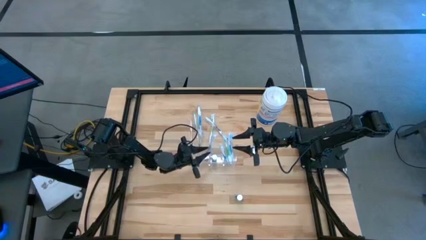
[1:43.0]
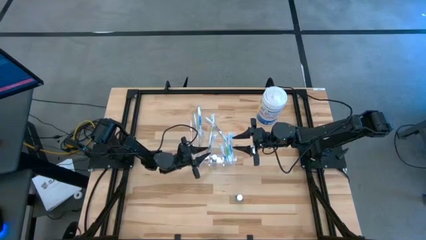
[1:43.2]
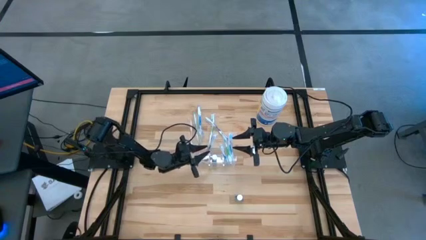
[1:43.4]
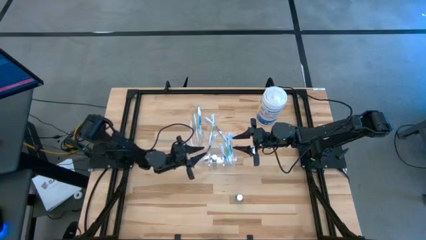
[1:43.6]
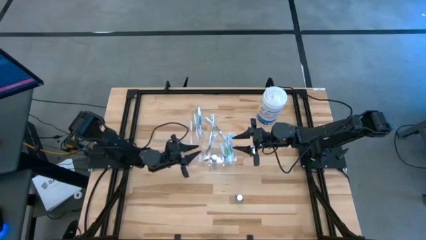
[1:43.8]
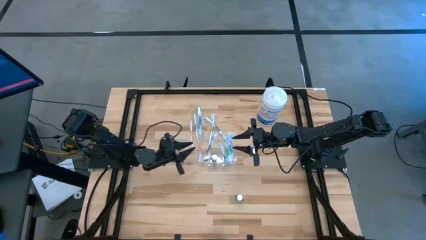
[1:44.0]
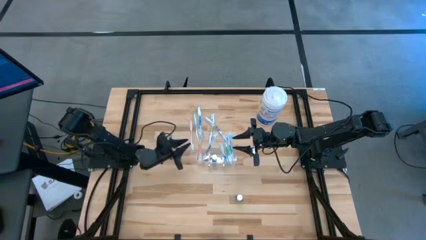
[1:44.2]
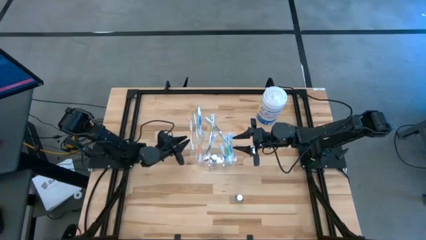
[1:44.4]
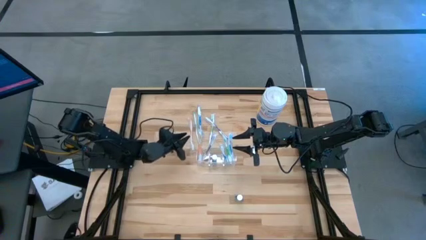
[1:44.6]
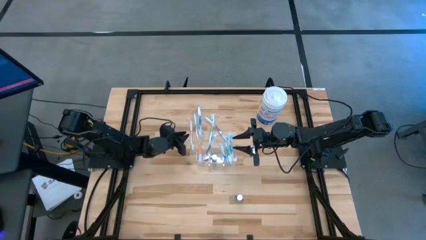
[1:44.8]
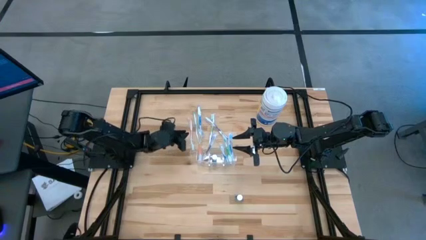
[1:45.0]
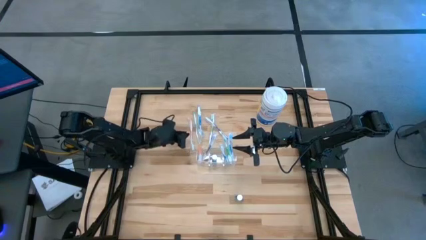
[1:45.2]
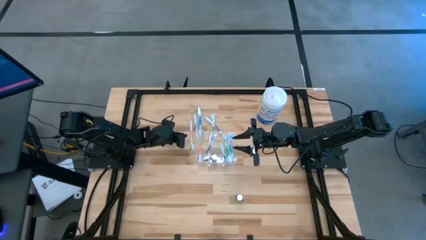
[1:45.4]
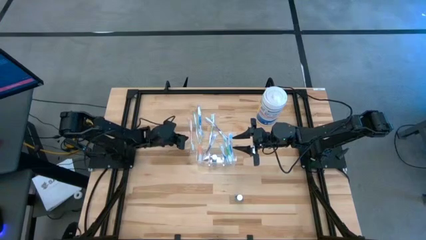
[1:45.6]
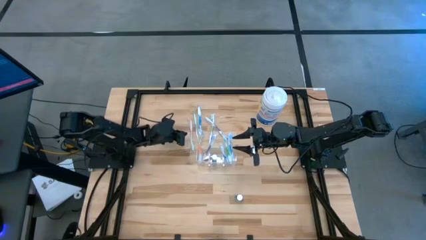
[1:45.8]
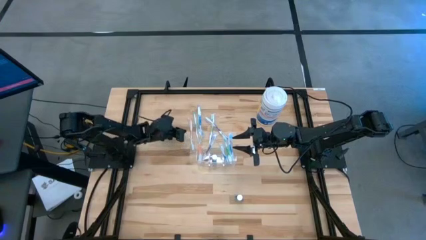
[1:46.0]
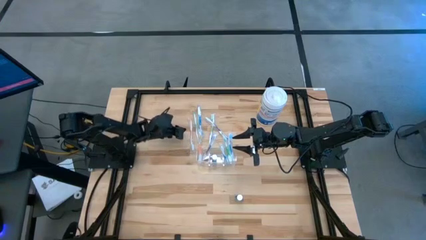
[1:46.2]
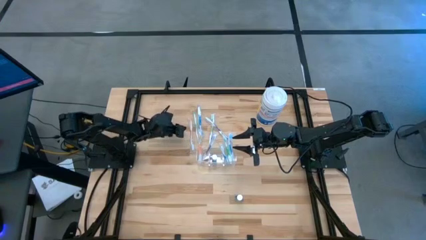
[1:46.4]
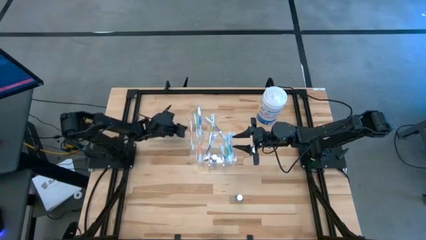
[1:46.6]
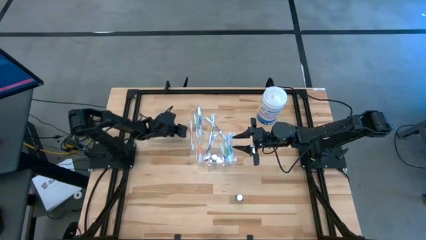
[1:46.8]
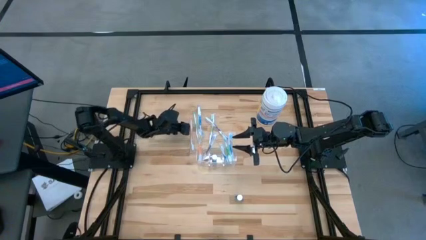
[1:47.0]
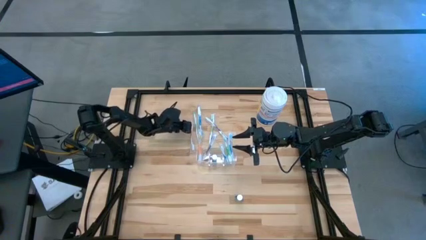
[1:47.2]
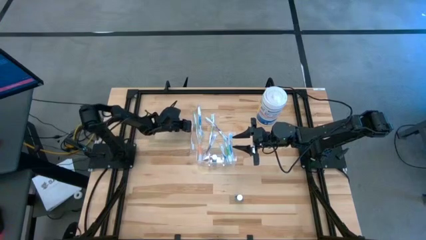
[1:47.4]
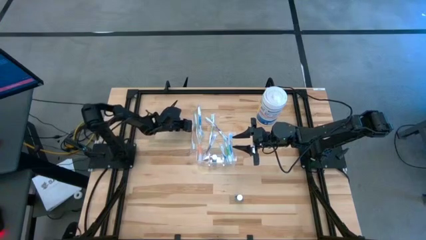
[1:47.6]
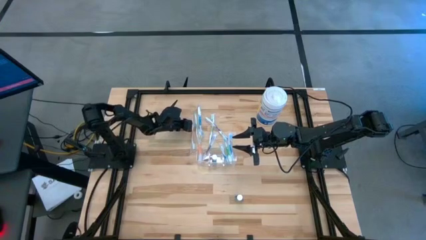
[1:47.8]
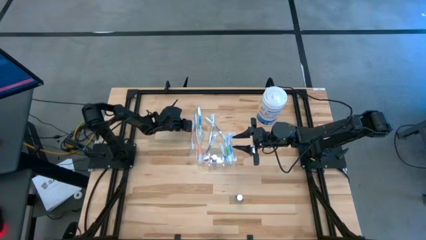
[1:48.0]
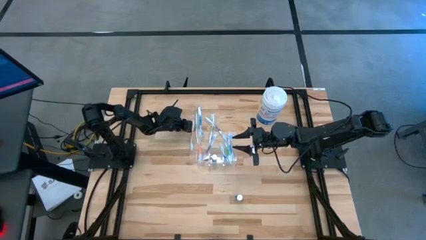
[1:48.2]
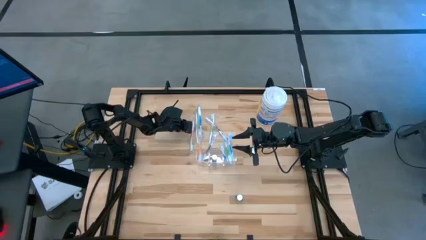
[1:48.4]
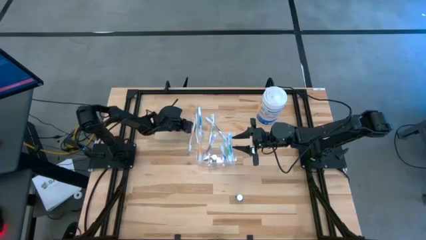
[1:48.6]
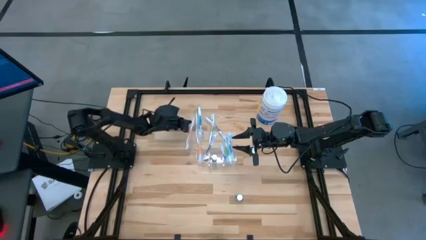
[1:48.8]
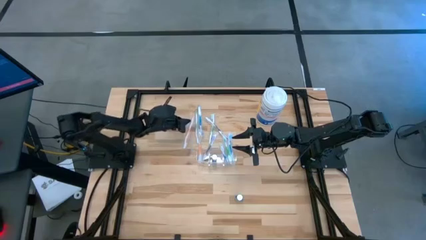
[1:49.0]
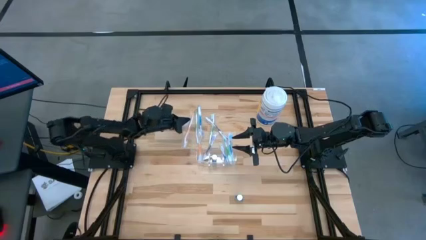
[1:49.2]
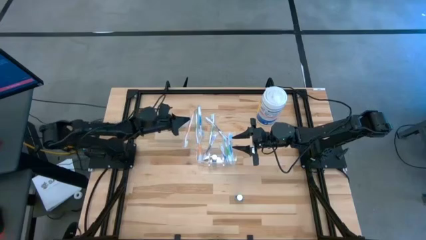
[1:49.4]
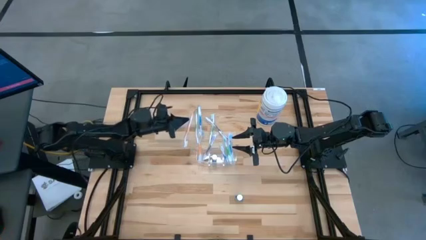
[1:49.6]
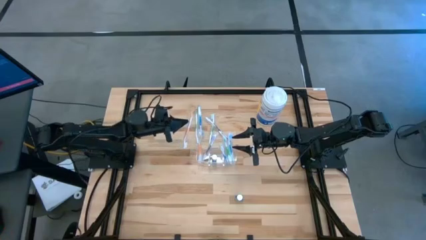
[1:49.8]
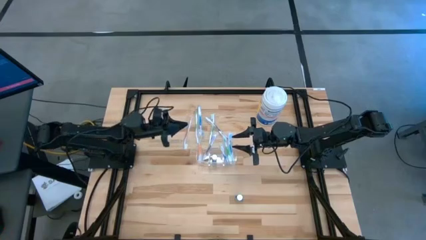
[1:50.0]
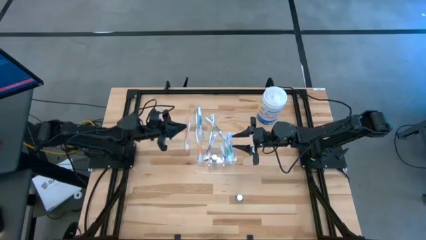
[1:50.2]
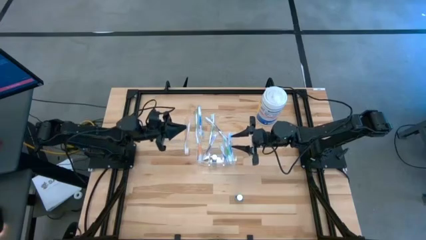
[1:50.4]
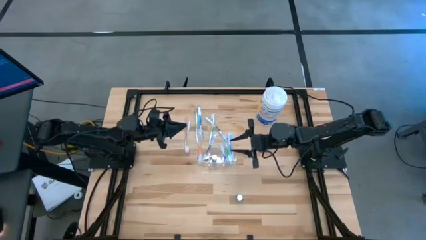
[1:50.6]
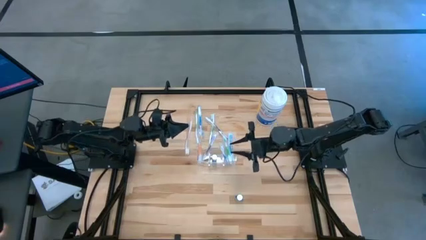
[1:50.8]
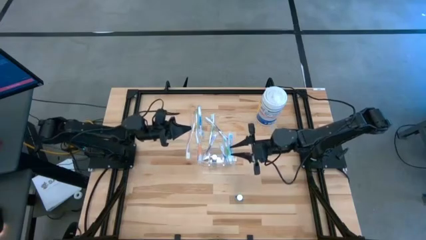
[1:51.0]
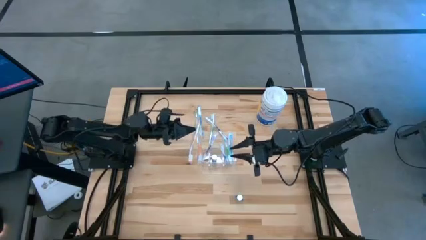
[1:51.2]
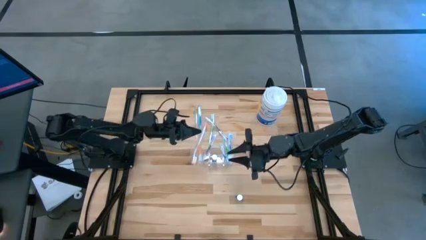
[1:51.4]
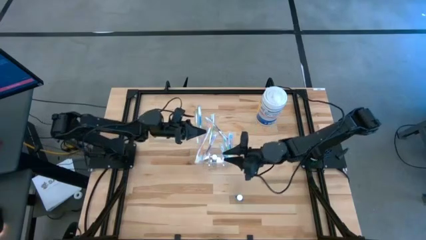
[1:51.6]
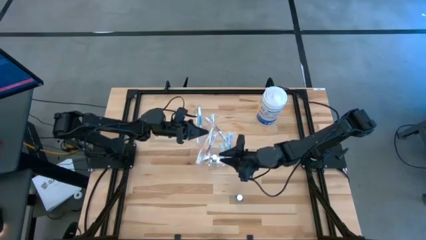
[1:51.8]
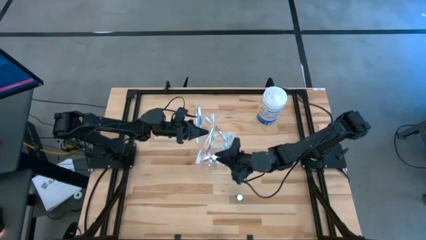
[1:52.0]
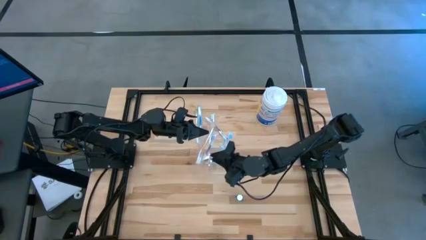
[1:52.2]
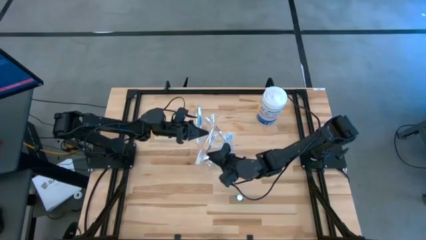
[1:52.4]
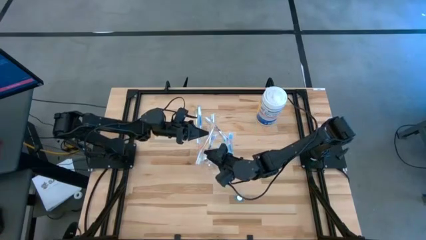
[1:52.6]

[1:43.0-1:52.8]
Task: Pick & Place toothbrushing station
Put the orange toothbrush into the transparent organizer

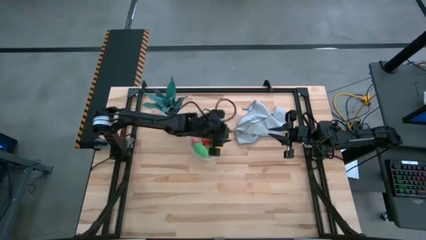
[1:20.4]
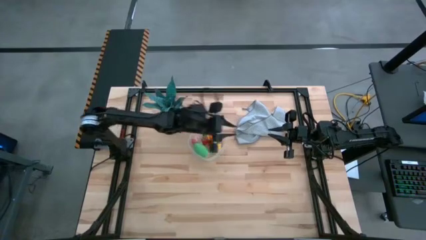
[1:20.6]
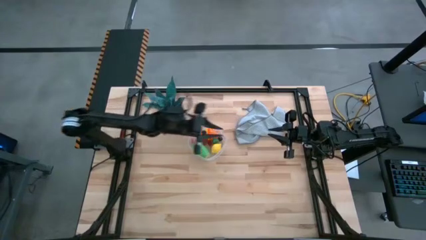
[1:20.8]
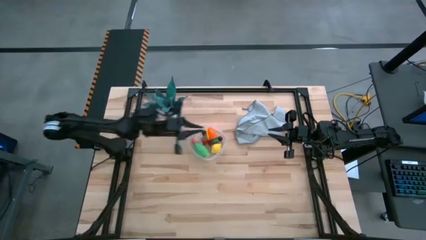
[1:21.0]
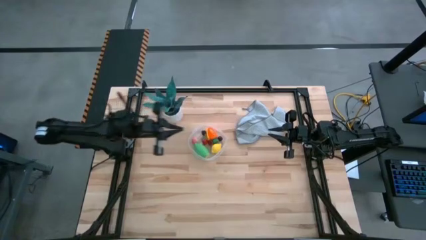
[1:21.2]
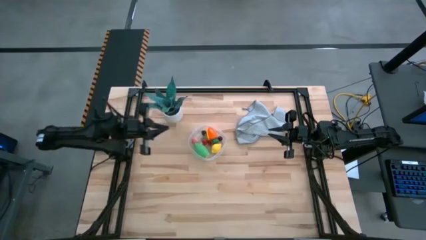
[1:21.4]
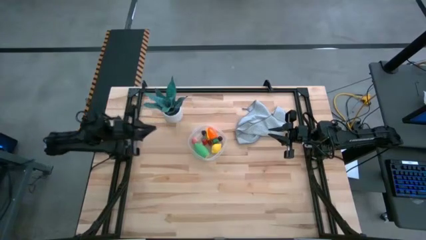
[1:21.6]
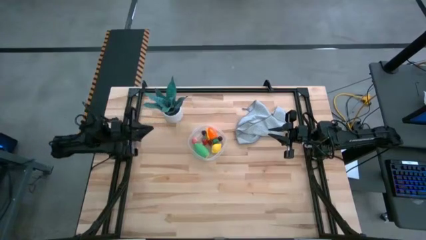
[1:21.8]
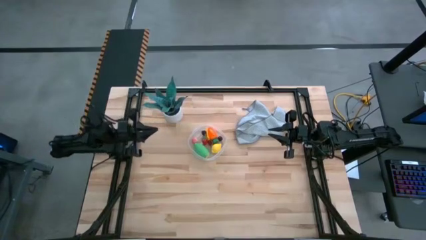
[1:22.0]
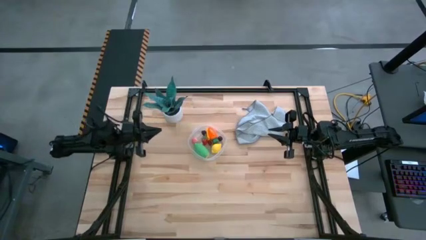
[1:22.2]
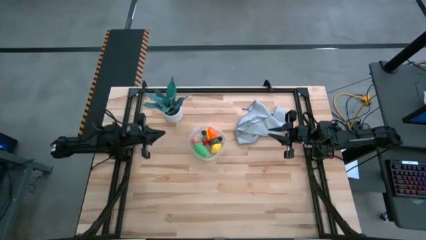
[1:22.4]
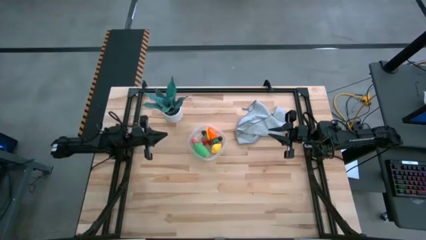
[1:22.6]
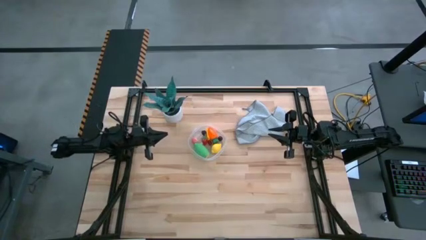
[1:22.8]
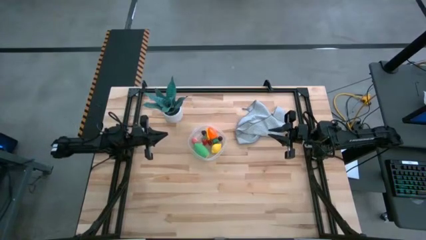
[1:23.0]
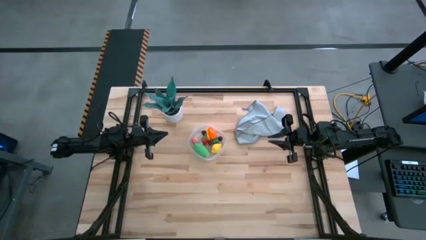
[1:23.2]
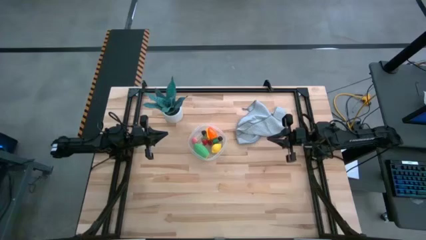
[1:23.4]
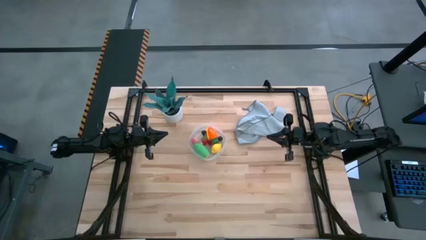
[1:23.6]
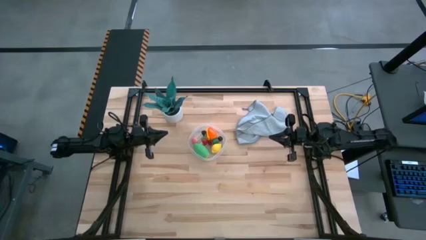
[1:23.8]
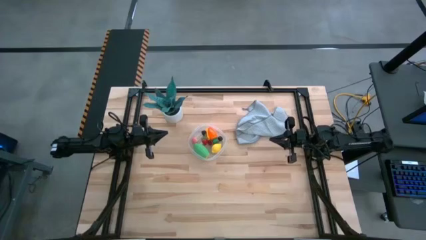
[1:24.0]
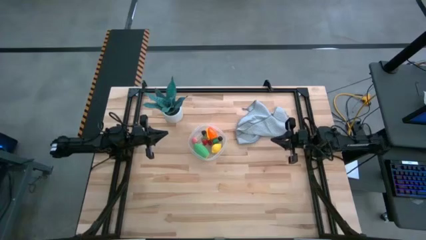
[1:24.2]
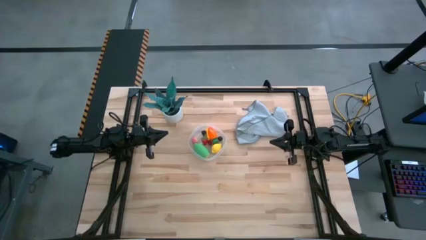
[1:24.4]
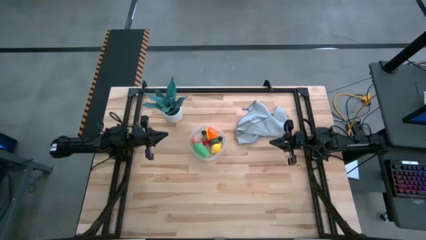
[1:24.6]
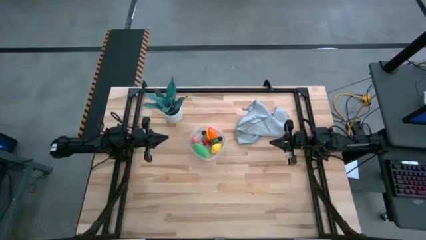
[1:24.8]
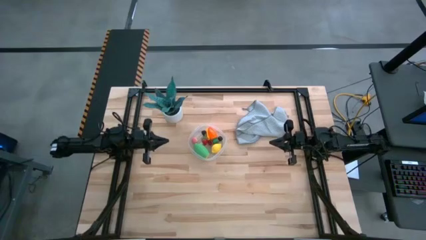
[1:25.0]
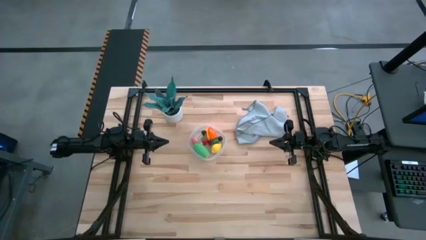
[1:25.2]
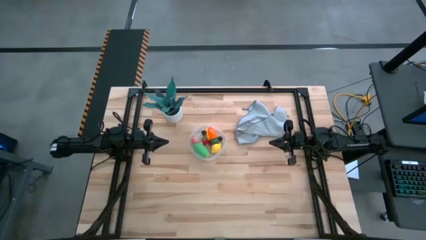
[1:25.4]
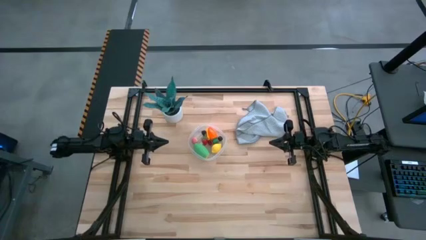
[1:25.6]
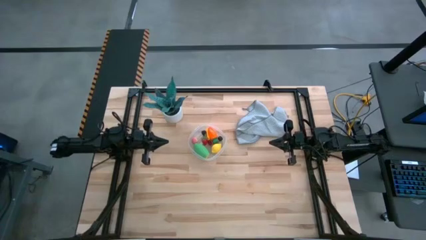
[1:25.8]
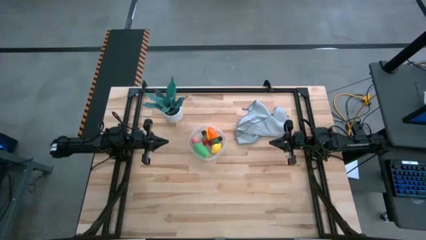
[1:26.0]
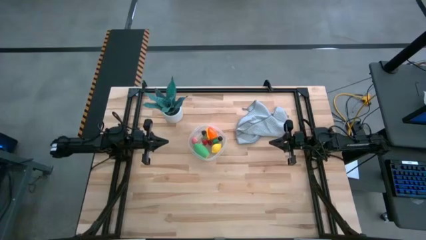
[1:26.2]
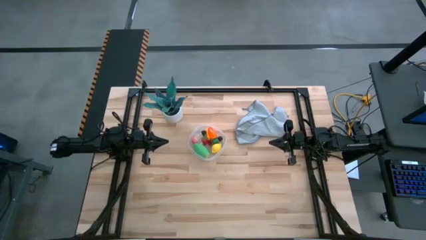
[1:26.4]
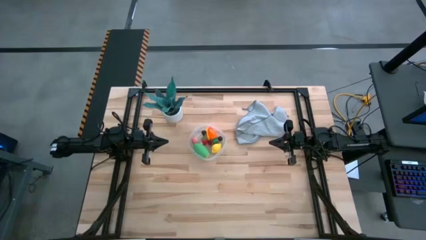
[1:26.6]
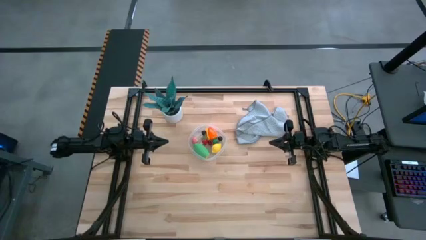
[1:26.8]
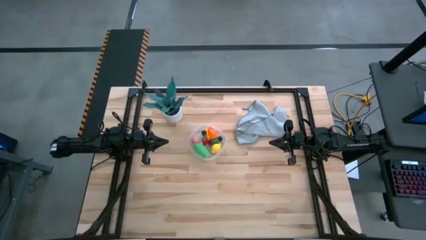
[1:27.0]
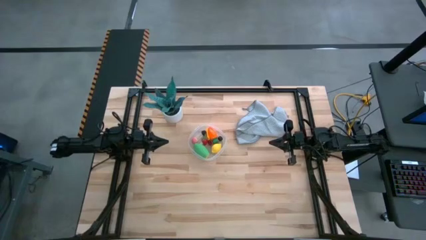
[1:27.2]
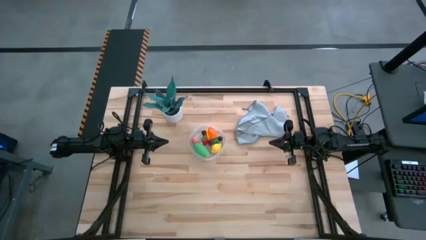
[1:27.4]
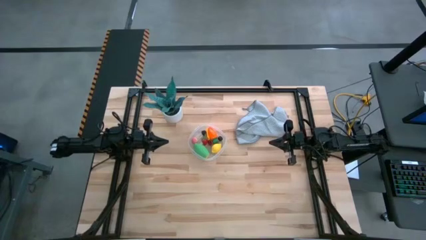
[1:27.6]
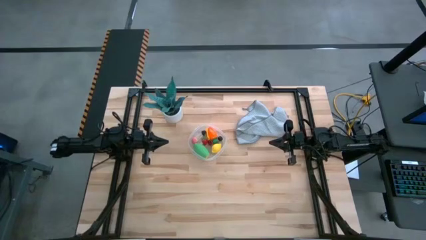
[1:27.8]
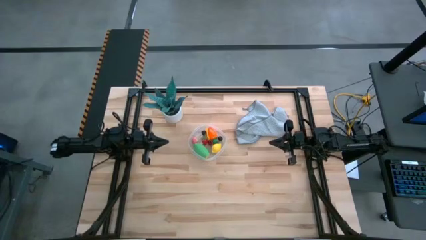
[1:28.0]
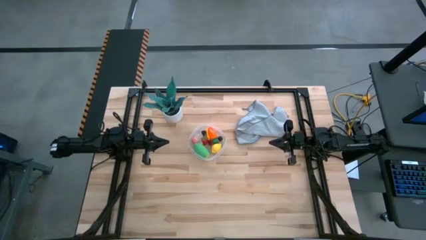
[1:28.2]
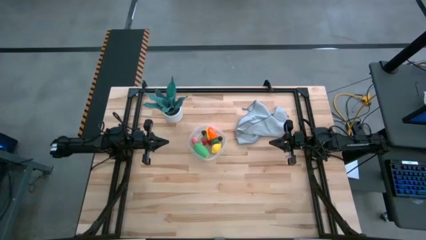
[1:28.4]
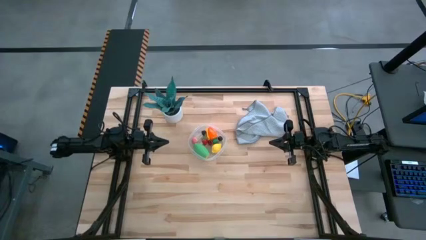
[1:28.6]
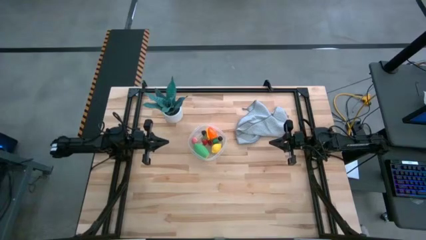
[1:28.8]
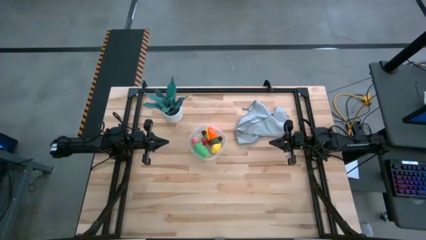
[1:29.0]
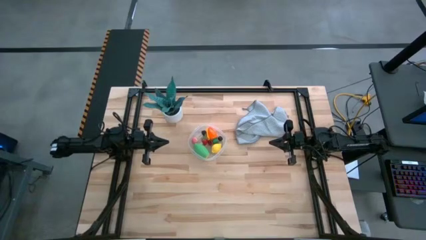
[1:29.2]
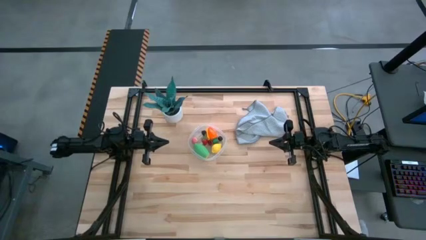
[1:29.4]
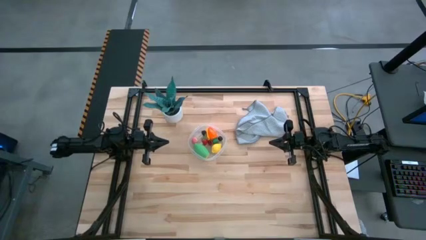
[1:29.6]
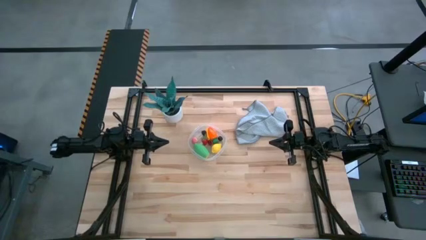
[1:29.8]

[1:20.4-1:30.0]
Task: Pick and placing Produce into tupperware
Return to Home Position
